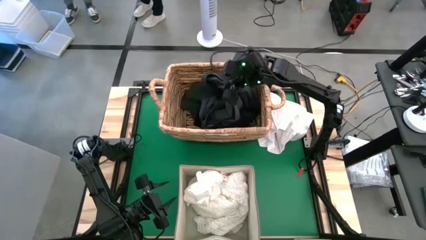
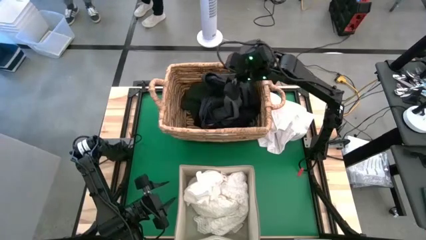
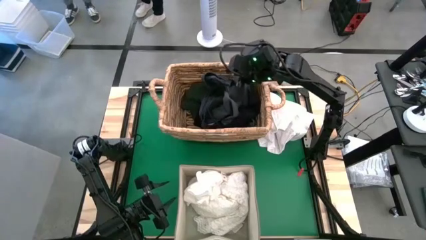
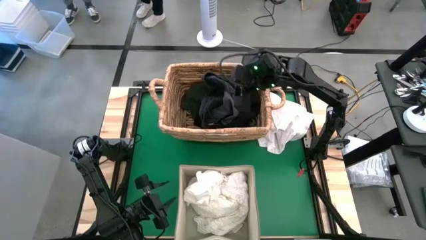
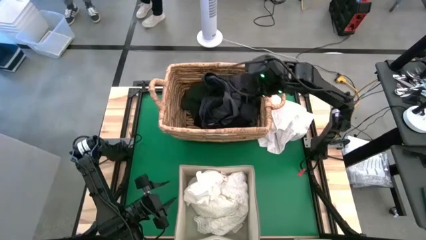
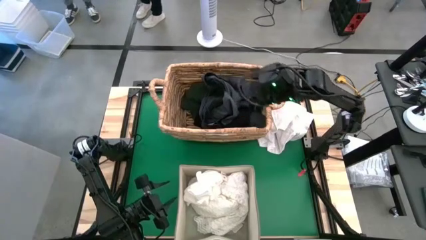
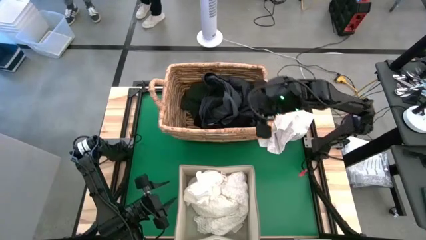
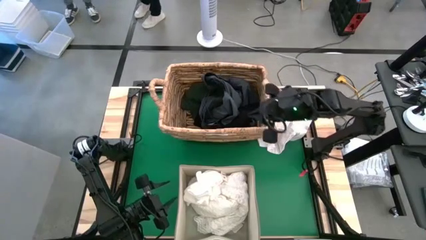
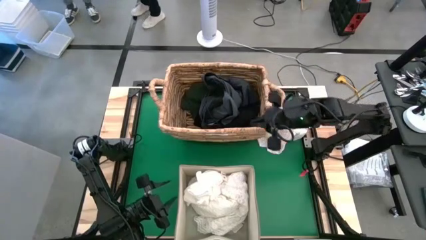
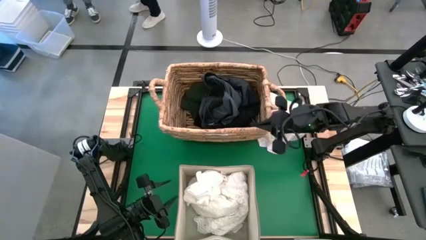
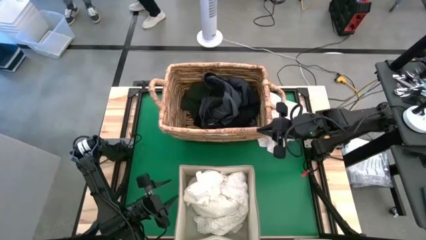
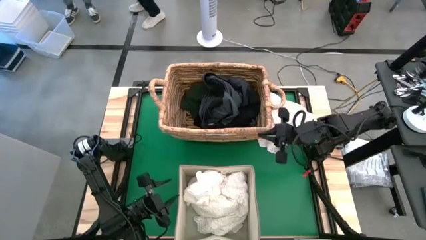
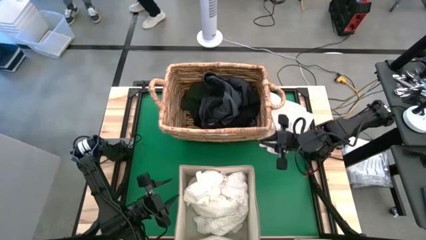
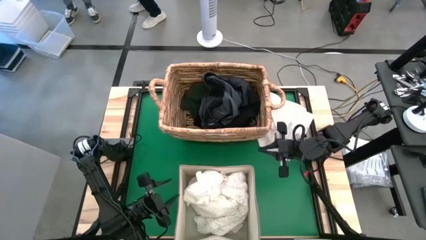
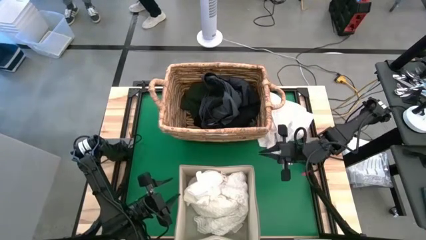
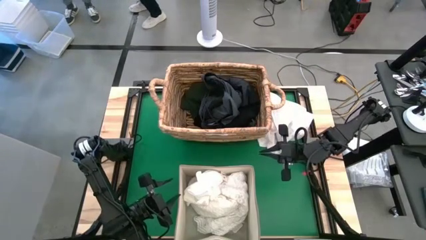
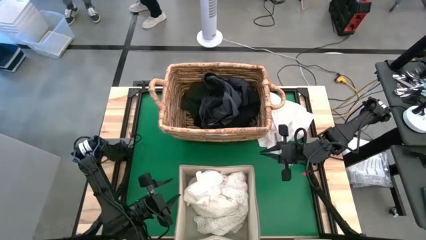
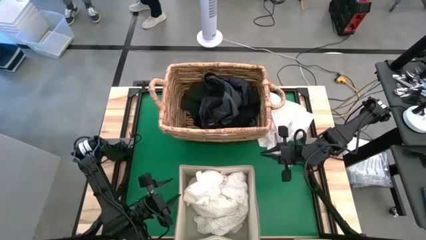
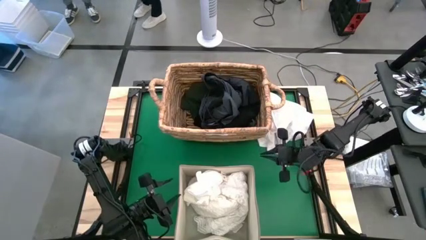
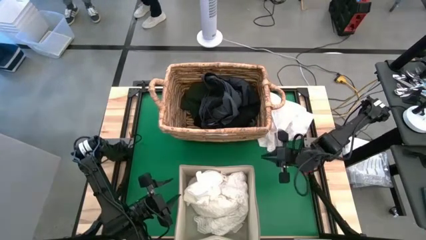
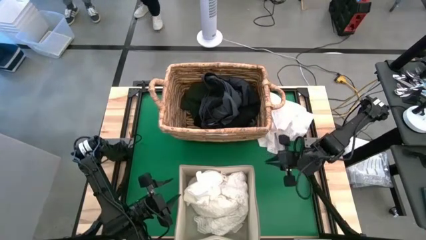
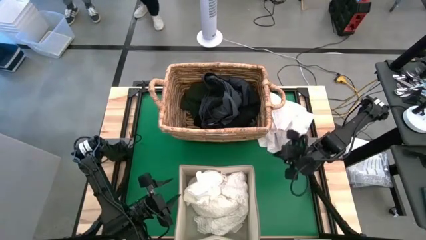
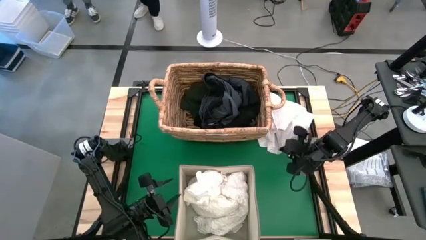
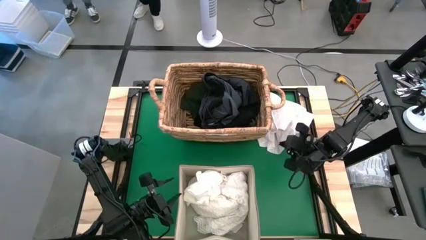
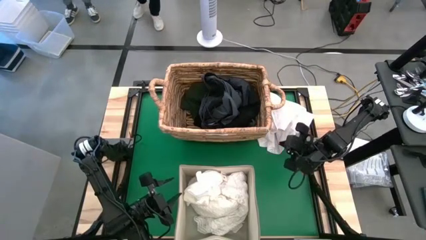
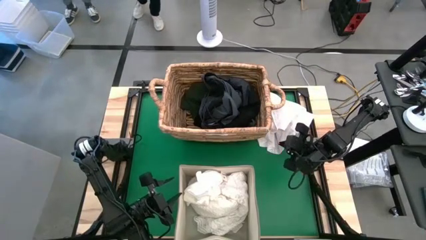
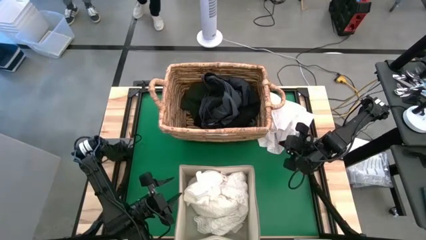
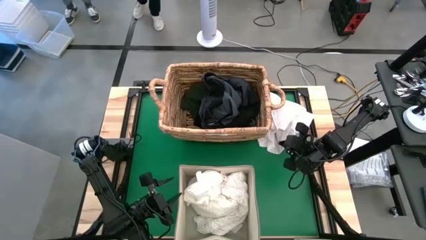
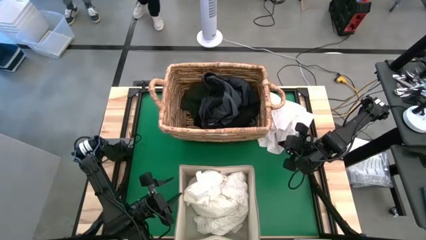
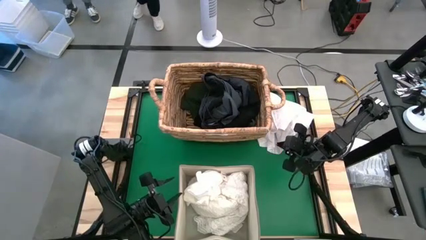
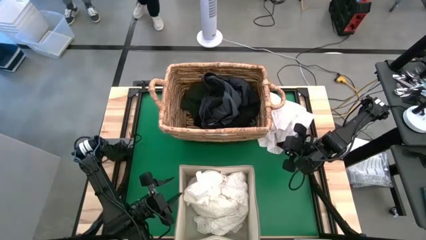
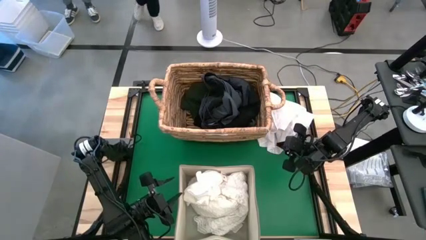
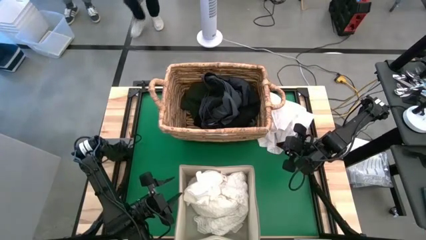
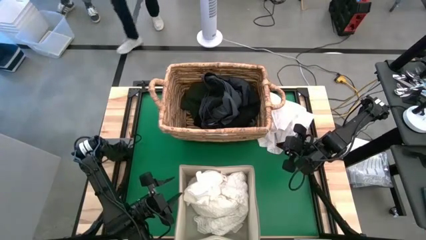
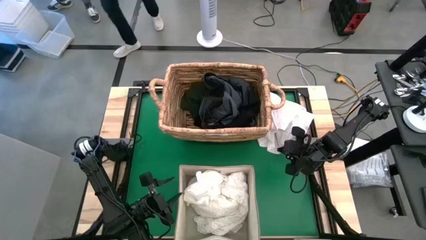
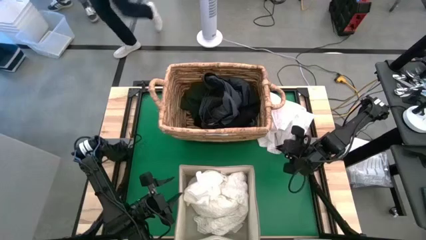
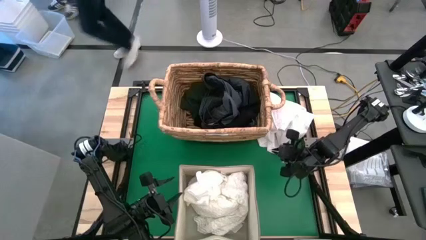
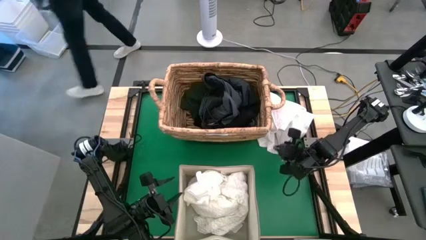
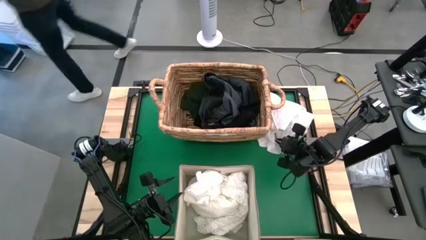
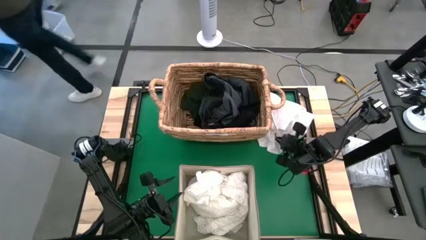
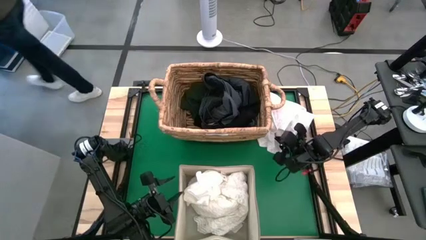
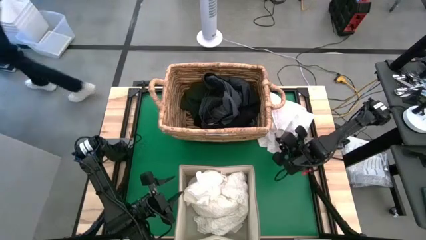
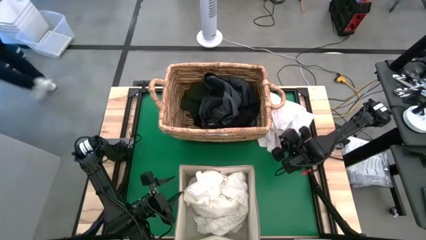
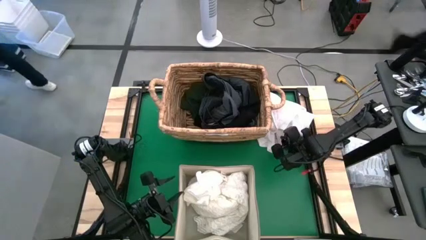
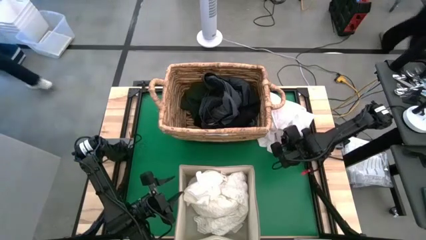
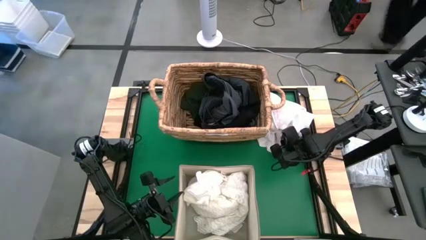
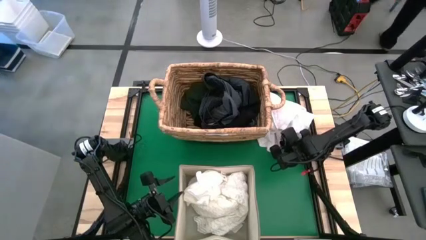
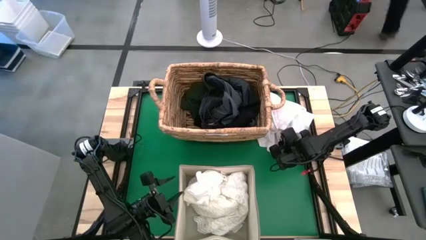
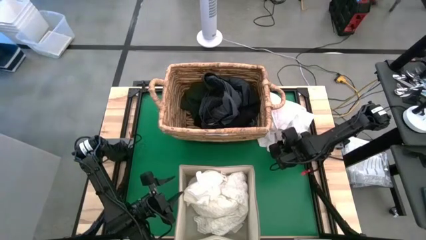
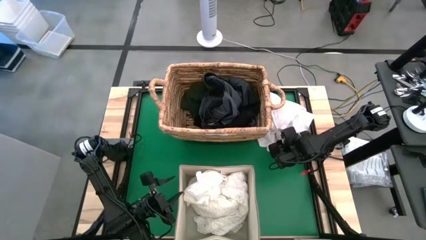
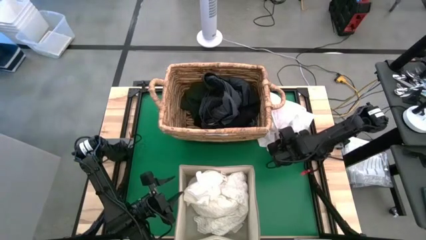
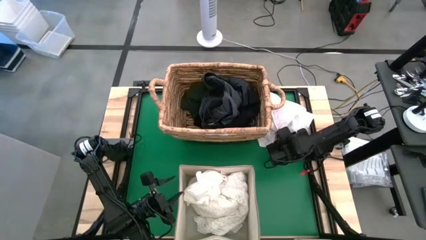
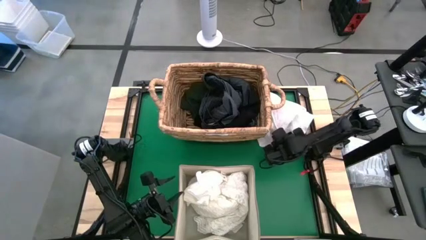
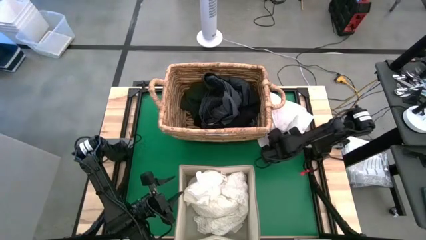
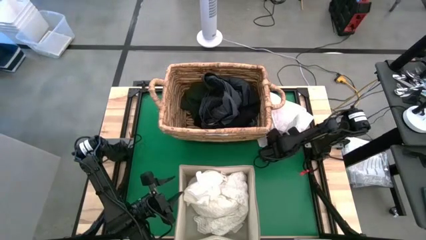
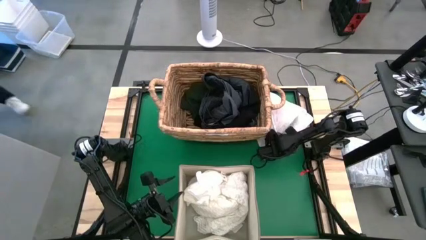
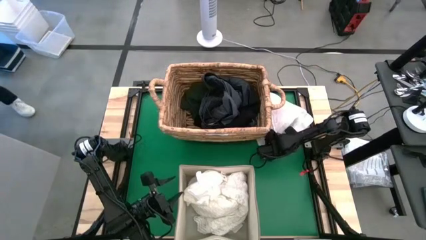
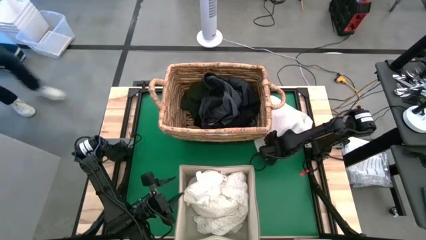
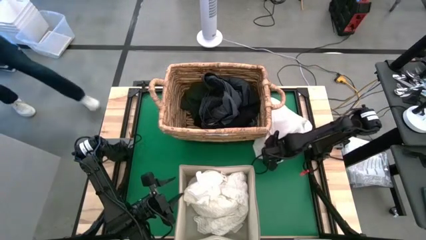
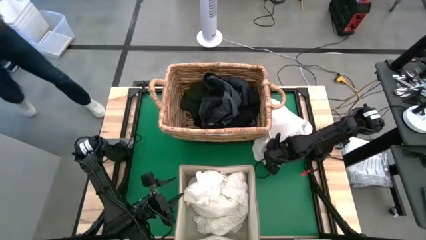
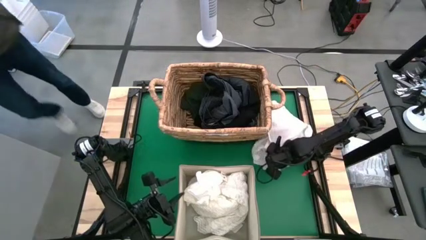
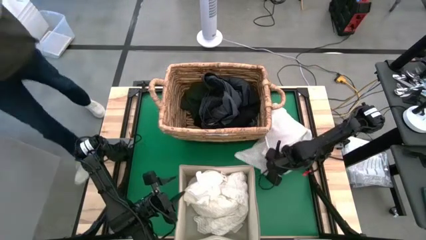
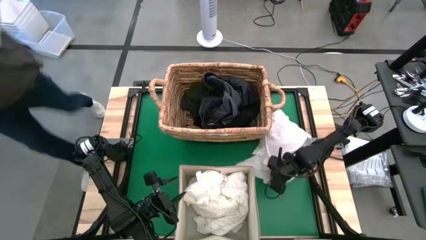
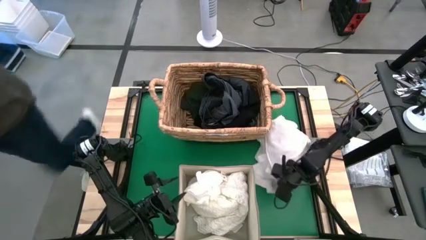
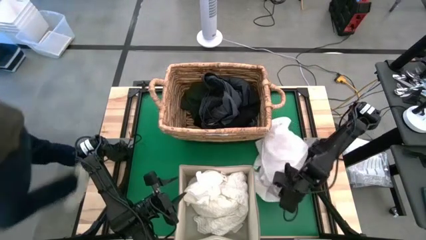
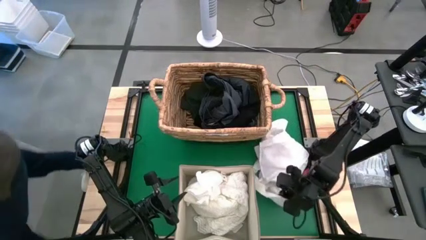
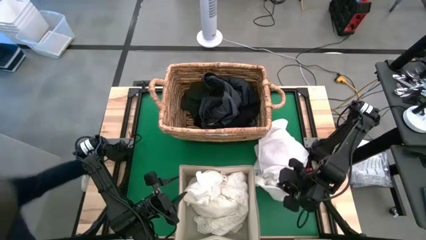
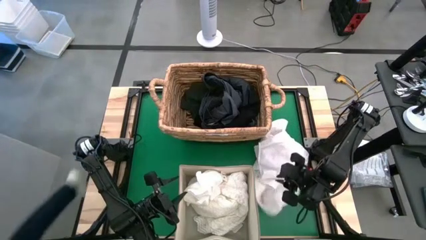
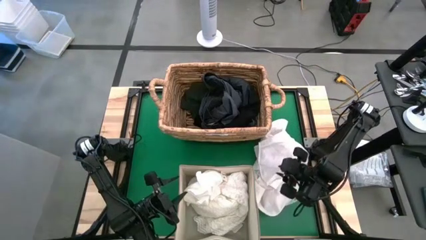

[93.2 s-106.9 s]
Put the white shirt into the white laundry organizer

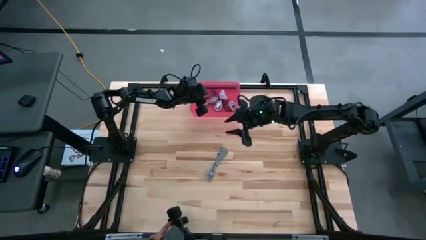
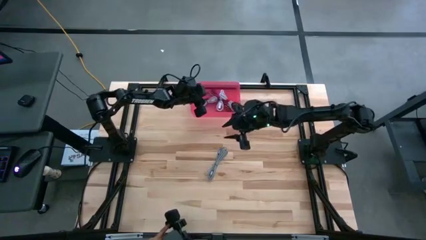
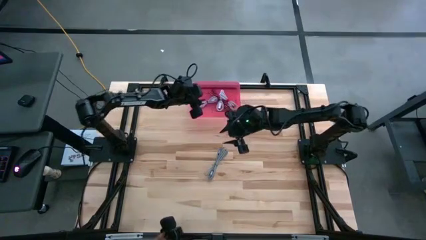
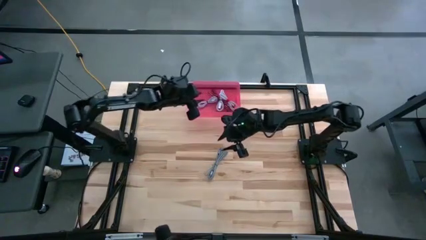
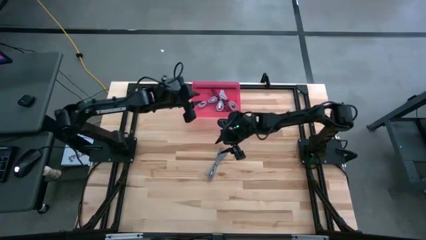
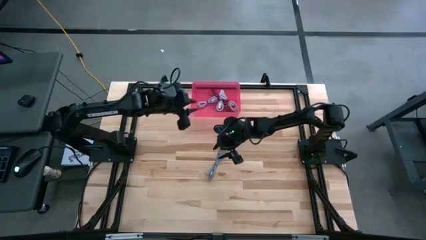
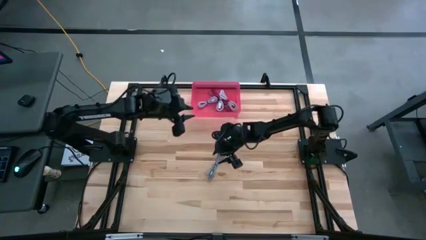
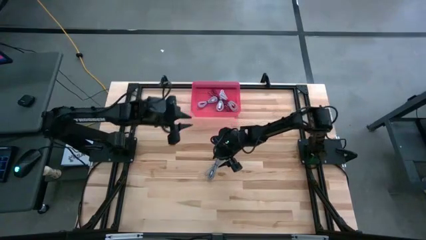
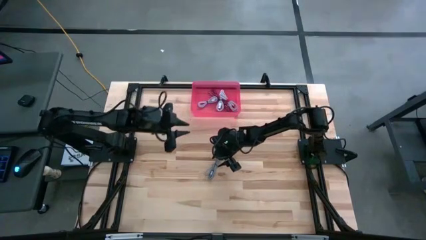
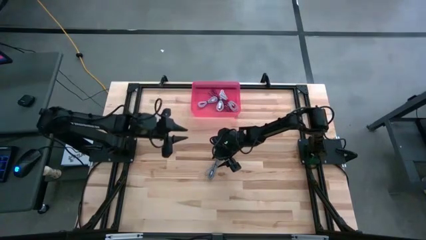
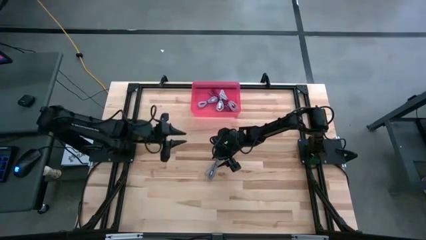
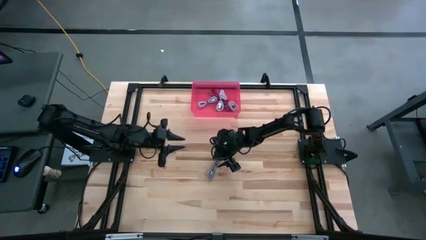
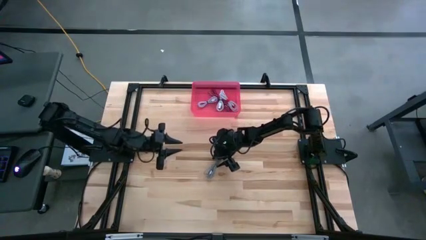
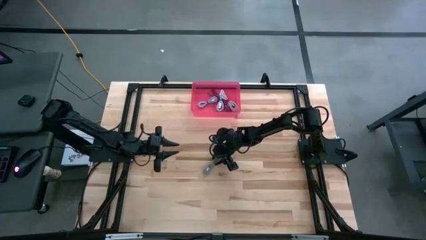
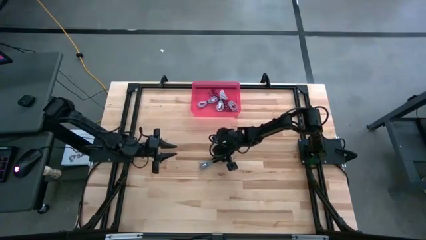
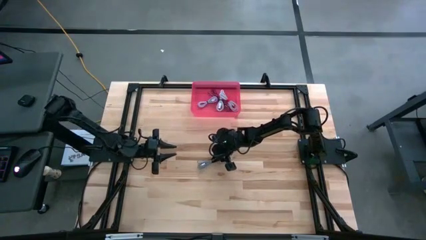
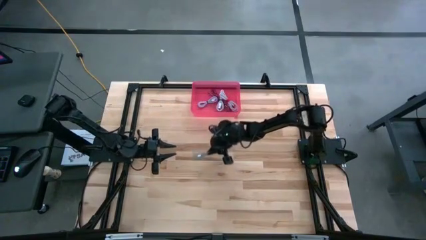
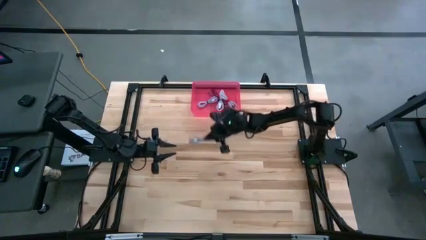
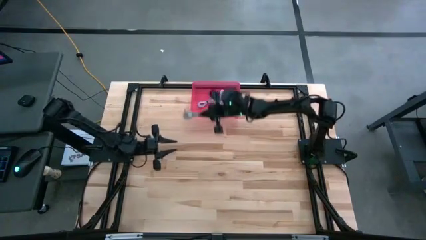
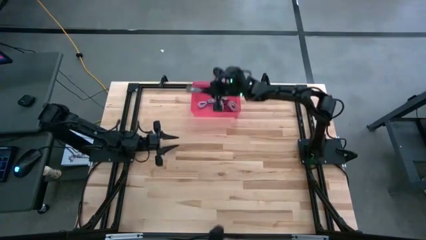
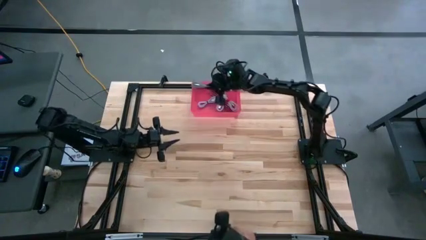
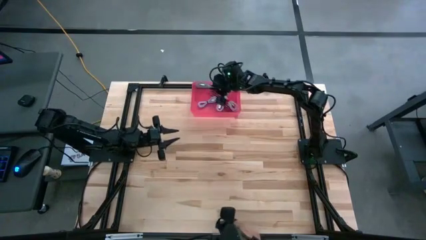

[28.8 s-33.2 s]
Put the black and white charger cable into the pink bin
